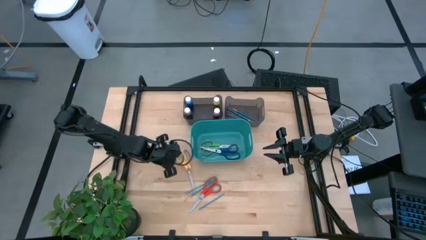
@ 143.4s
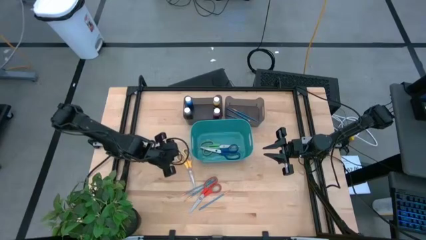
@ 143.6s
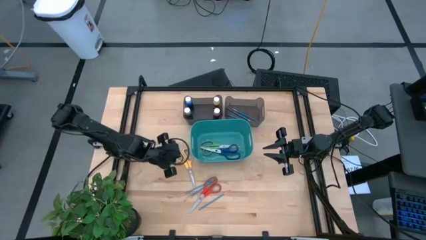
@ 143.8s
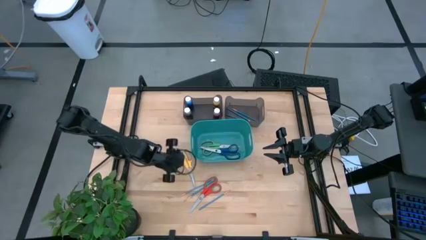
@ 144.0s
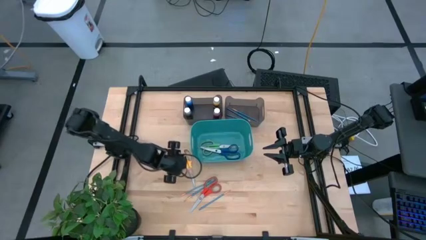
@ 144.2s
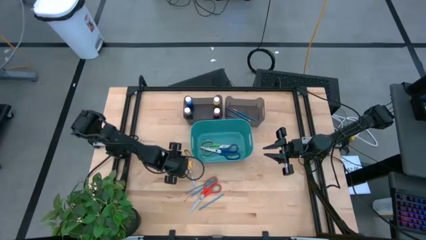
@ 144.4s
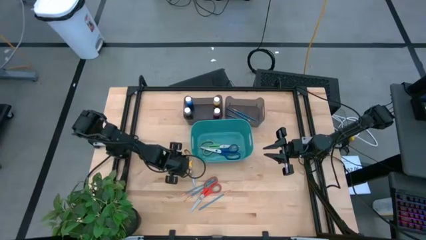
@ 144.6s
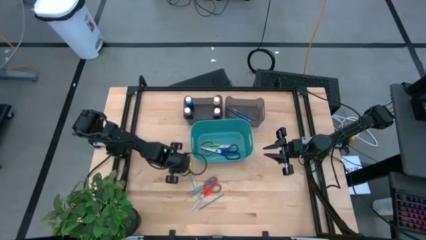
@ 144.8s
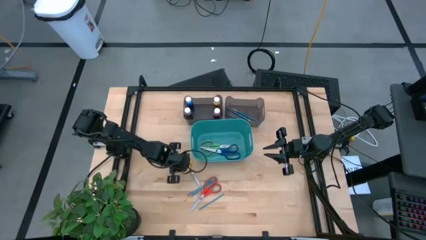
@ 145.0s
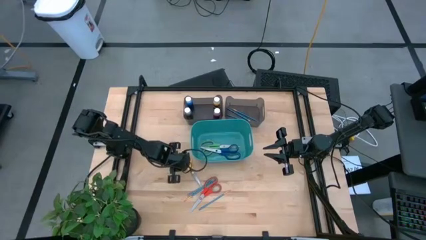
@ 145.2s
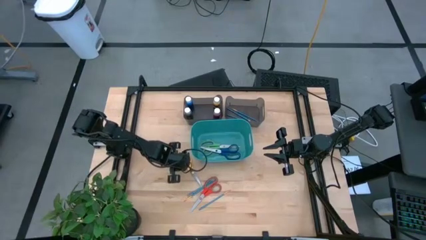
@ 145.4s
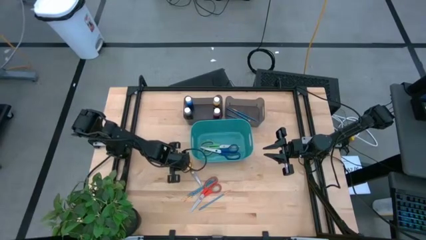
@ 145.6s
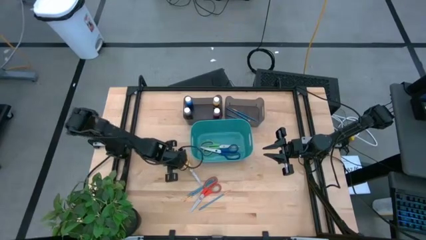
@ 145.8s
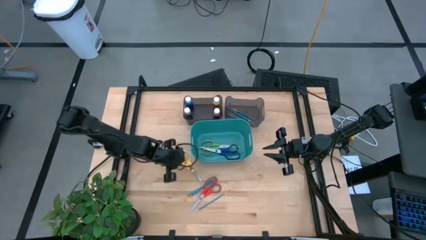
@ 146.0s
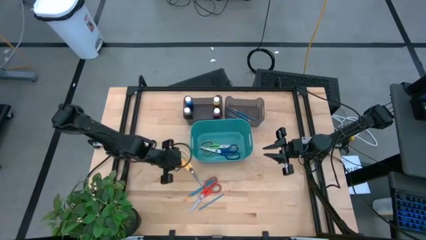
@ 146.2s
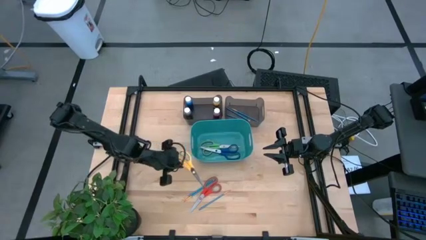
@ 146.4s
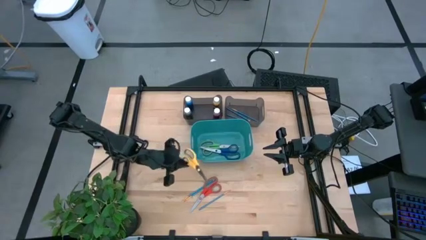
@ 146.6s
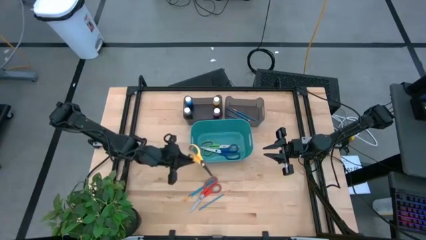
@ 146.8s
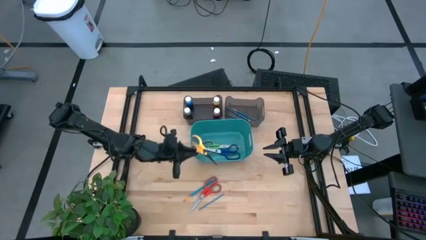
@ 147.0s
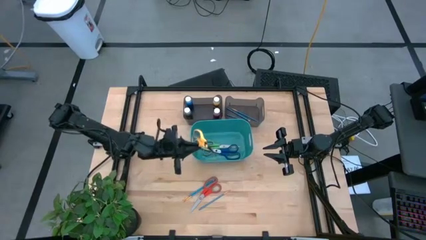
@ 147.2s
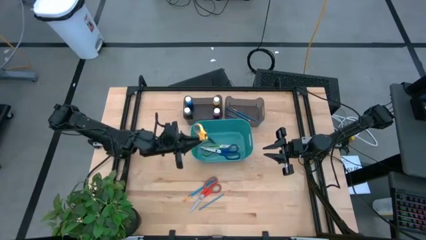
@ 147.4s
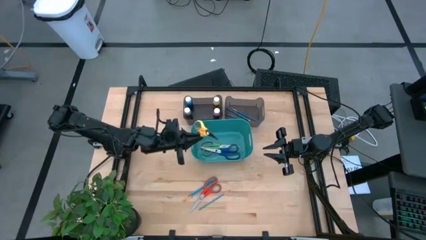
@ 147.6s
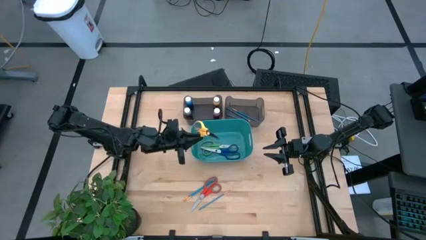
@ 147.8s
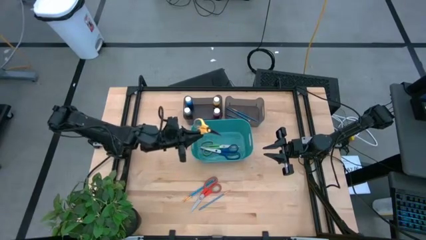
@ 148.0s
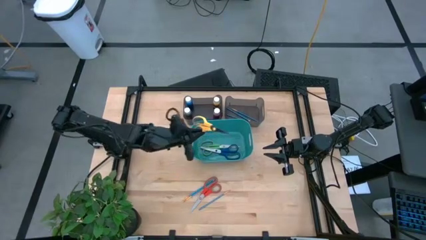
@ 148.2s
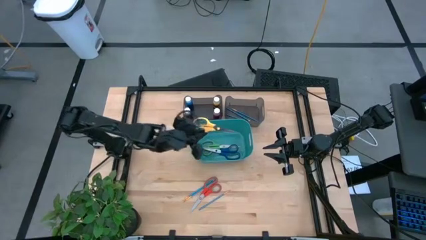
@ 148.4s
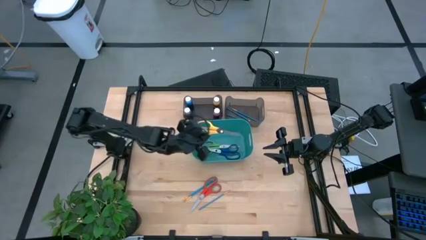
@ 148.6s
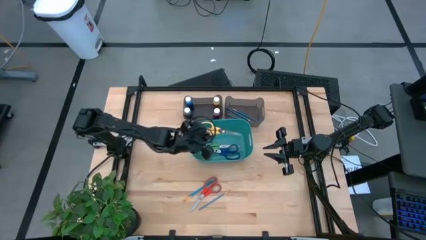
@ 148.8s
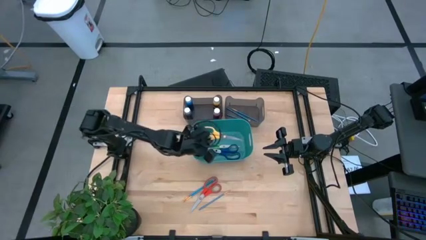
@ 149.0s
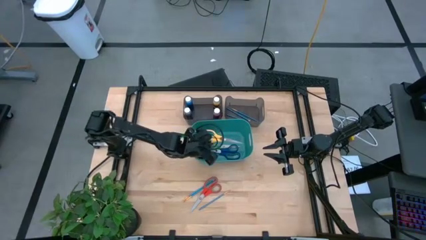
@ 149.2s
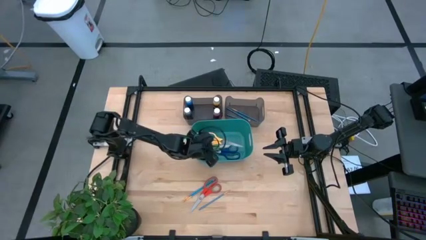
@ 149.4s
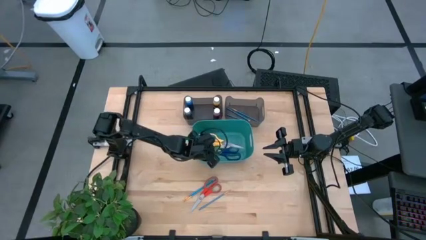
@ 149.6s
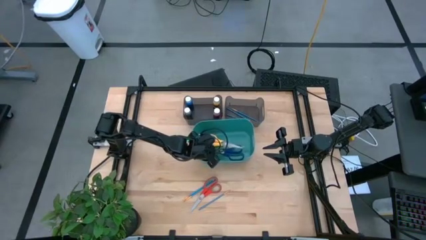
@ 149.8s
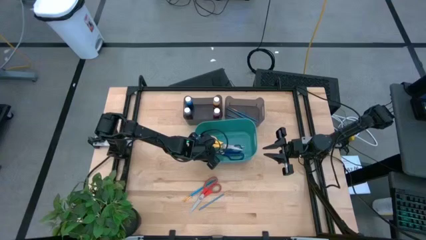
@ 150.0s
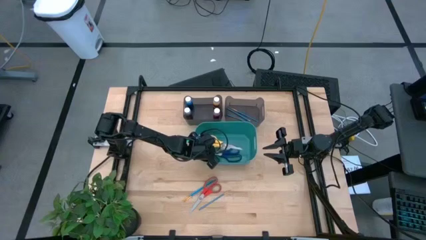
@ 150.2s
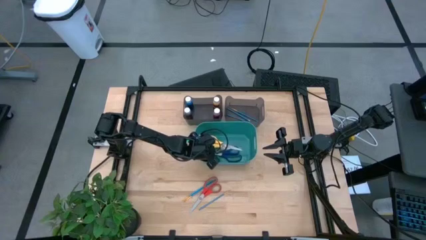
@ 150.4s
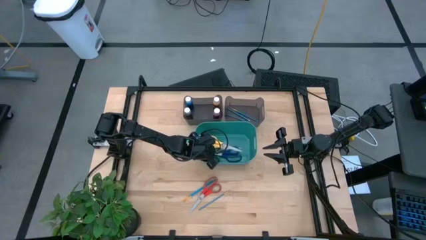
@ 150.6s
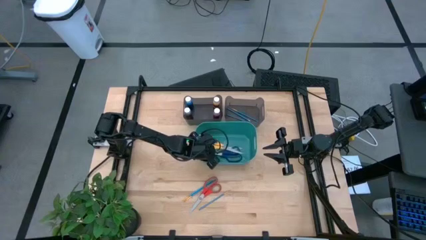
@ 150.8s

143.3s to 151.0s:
Task: Pick & Place Paint Supplies
Put the yellow scissors into the green bin

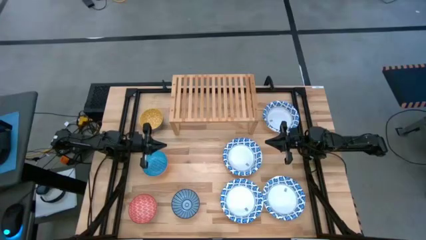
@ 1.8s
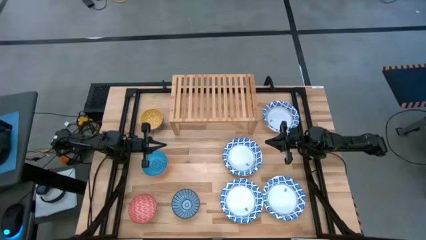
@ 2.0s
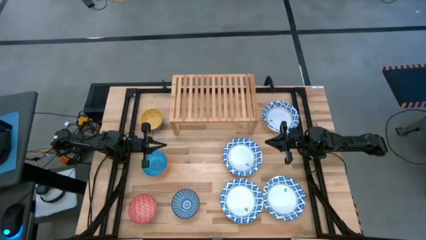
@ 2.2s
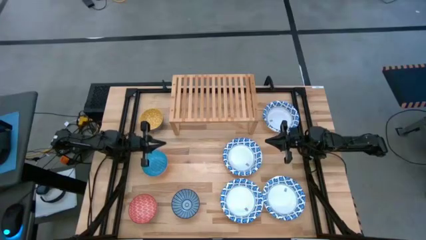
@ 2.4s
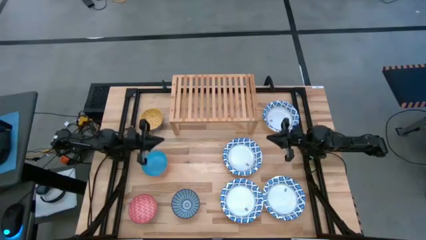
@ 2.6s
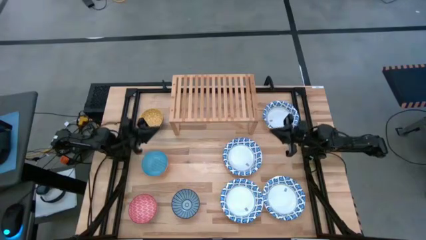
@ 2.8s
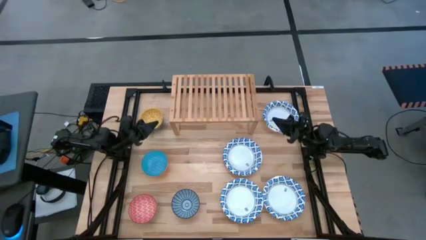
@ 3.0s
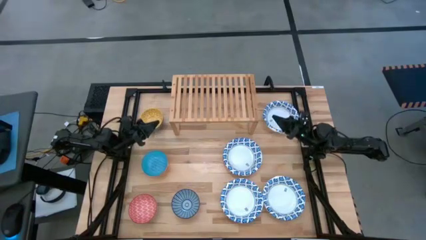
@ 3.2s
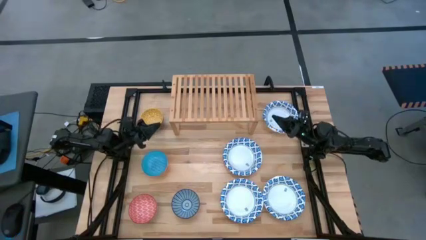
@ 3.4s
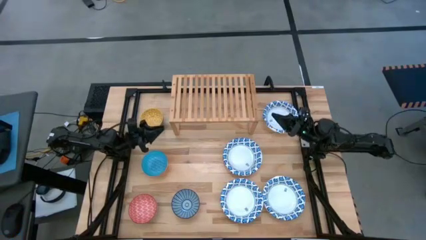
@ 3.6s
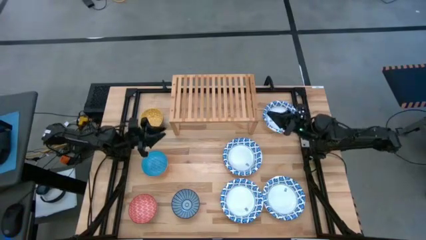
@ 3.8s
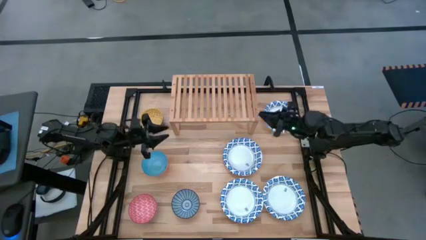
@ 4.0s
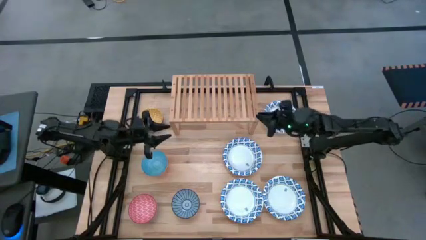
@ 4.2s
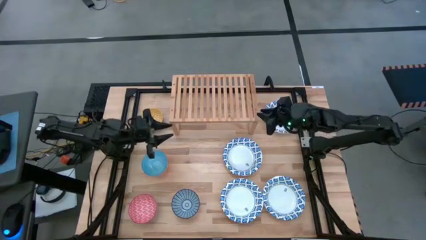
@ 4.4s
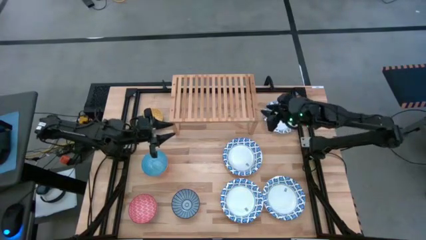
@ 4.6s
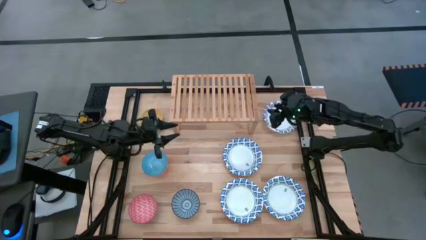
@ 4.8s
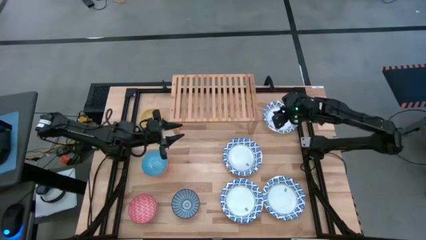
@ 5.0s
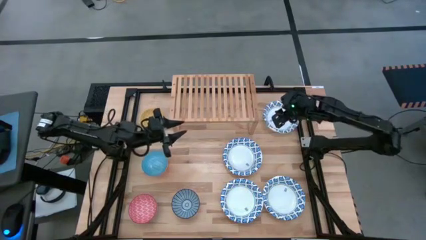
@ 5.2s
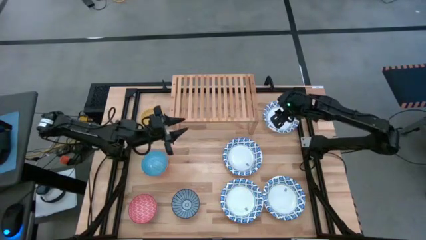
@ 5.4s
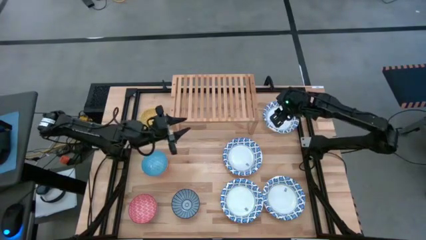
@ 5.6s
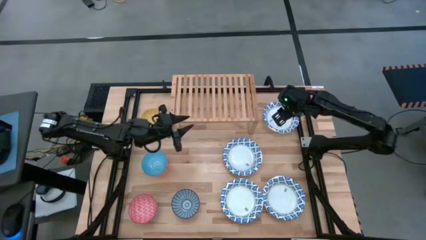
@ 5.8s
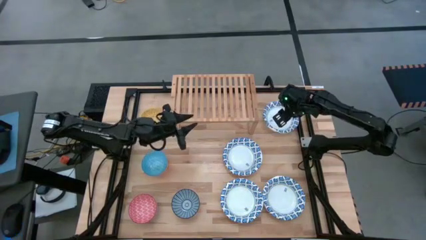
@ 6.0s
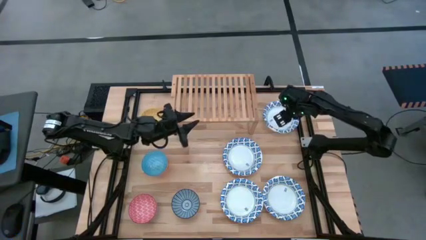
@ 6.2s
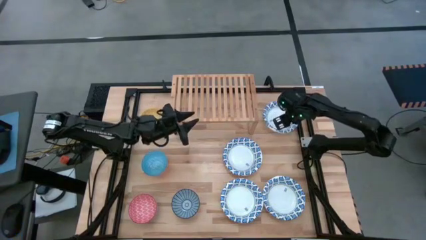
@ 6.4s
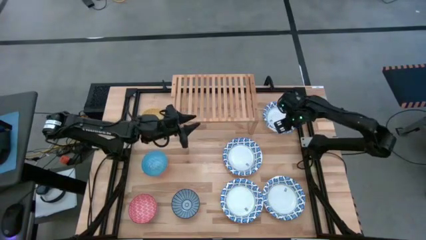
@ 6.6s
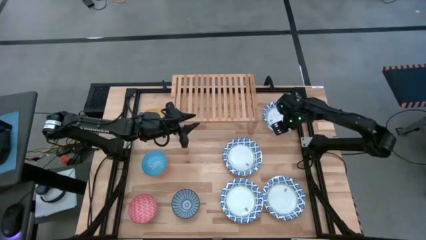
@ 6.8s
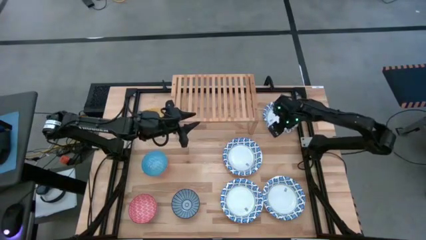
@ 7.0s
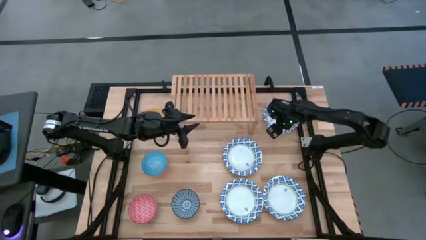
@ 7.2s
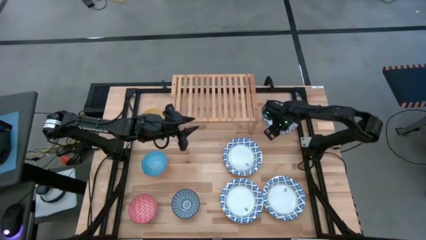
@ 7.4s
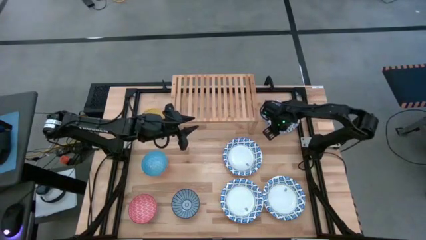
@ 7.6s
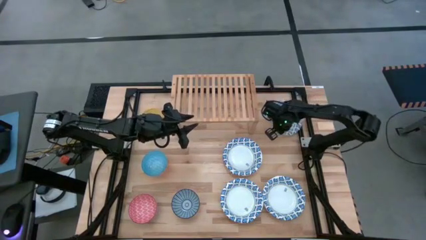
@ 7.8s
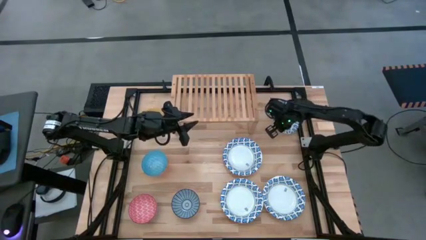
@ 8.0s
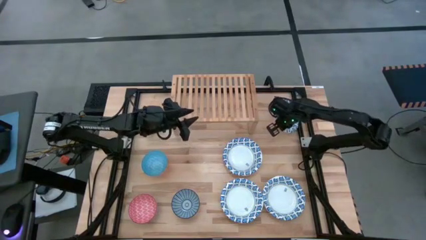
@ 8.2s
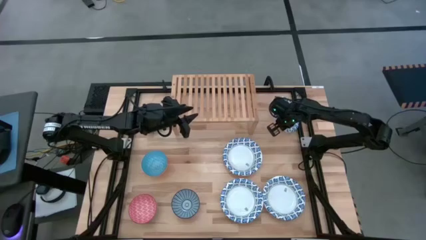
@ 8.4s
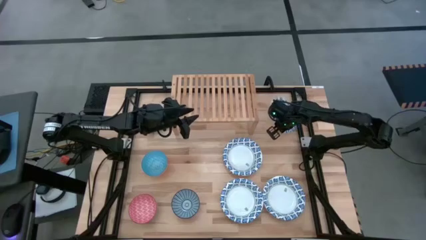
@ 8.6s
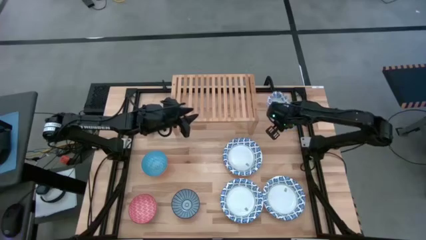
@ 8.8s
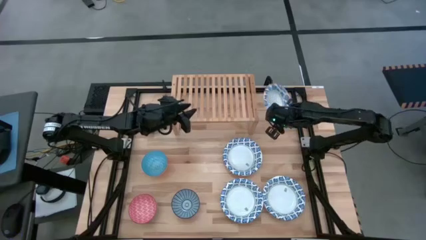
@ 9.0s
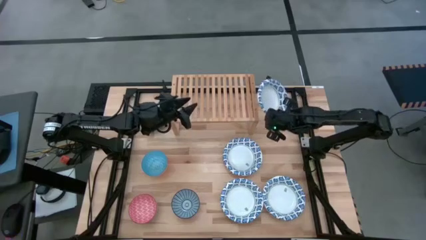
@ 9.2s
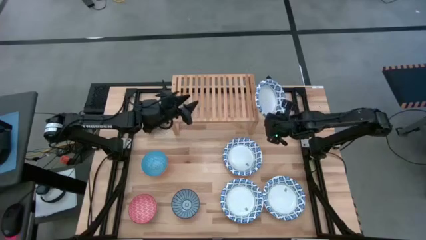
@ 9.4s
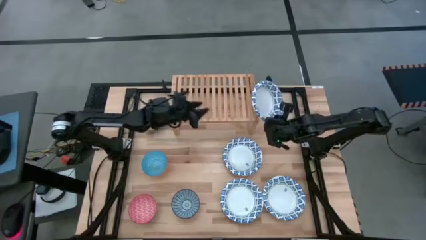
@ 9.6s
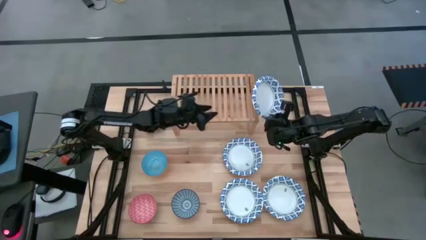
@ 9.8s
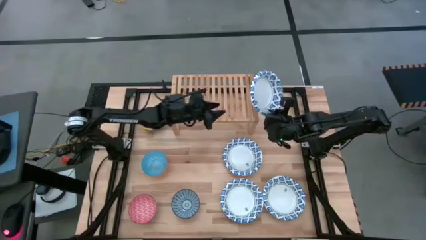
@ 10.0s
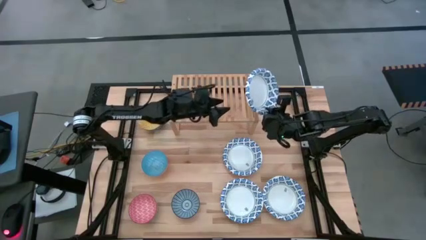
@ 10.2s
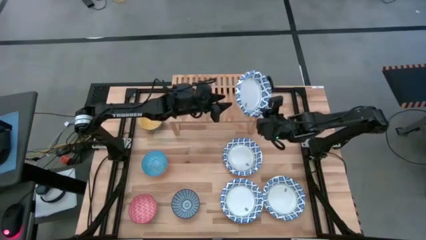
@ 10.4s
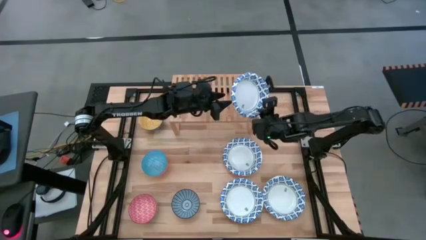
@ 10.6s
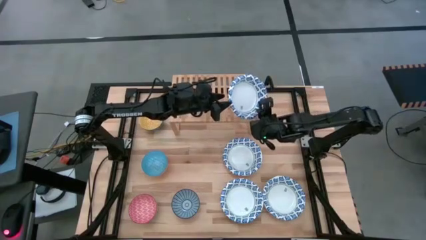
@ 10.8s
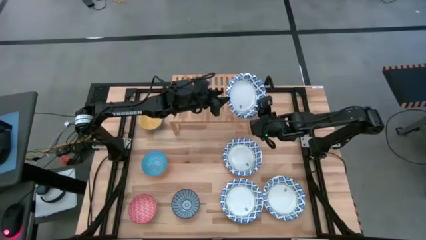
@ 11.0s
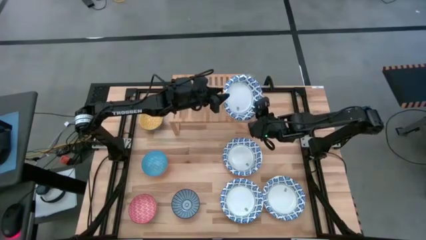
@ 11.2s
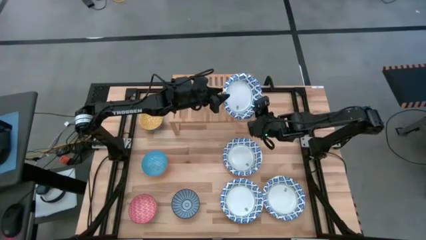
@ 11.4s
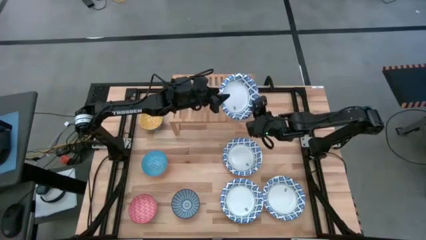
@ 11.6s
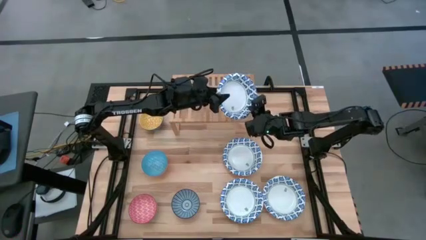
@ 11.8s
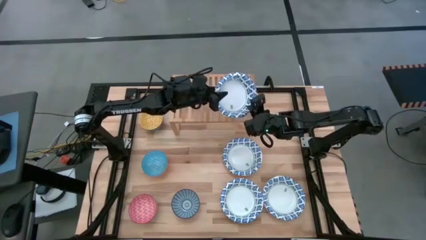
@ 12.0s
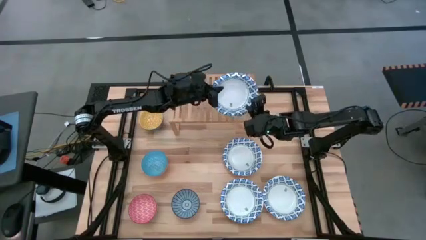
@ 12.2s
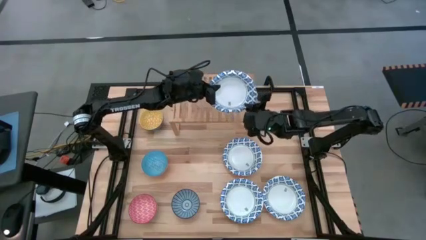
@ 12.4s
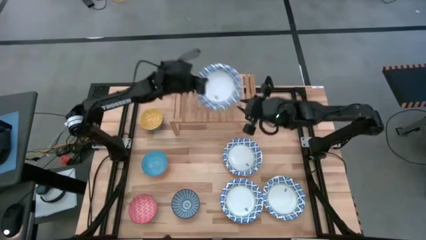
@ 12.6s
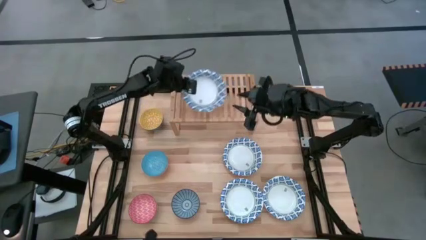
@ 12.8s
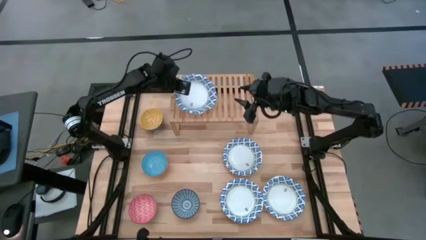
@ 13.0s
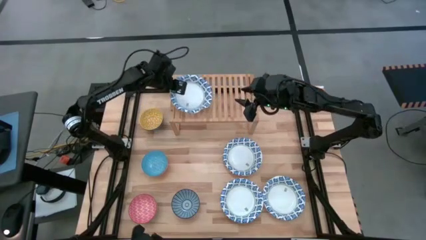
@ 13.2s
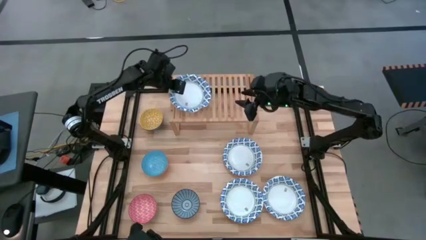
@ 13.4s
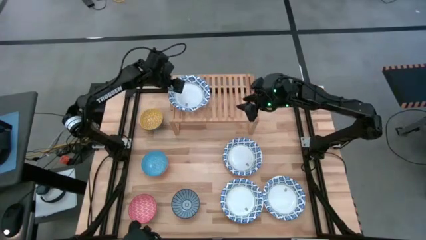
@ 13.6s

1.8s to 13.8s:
Task: Place and stack bowls onto a shelf
Put the white patterned bowl on the shelf
